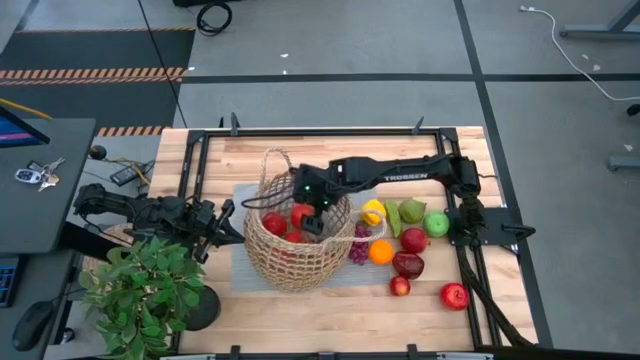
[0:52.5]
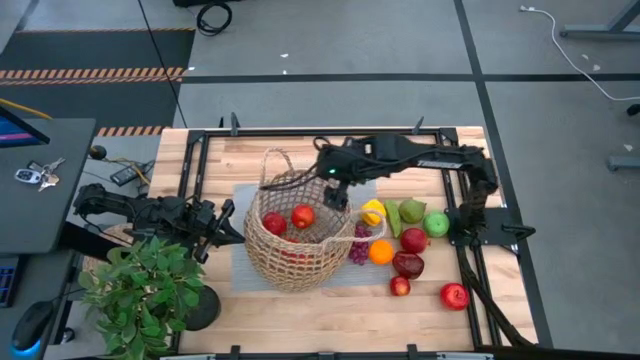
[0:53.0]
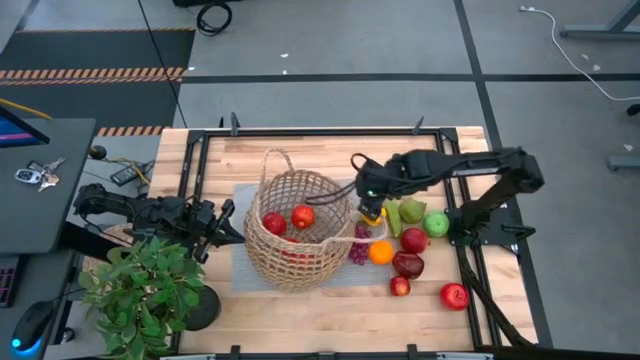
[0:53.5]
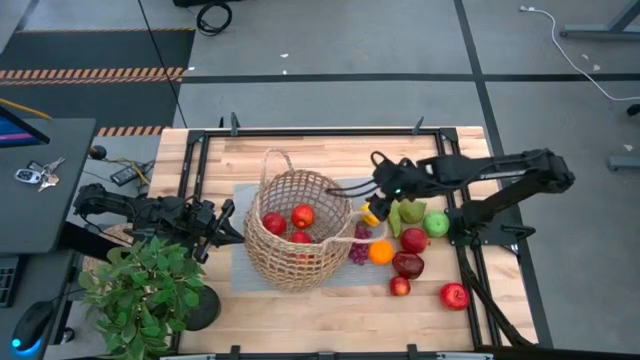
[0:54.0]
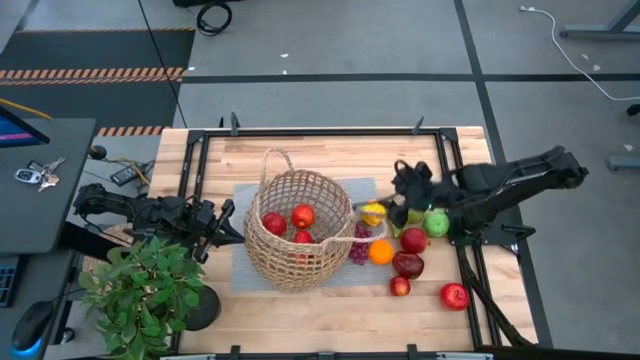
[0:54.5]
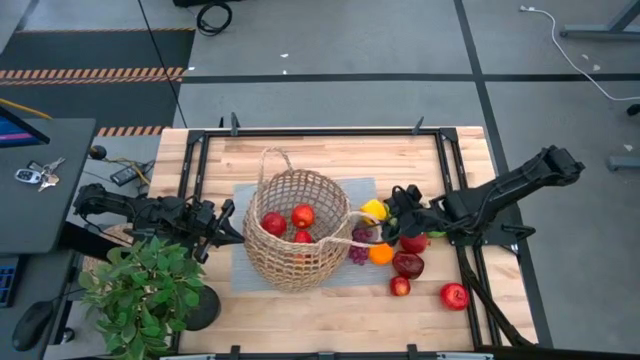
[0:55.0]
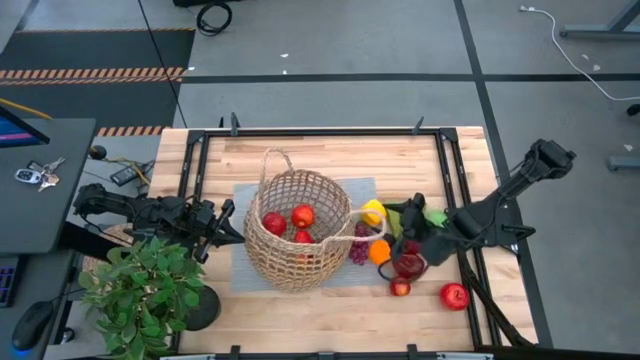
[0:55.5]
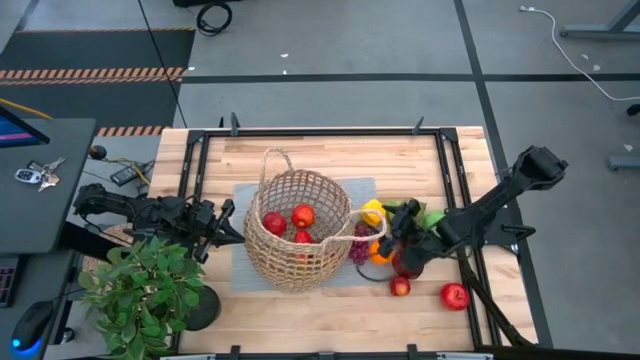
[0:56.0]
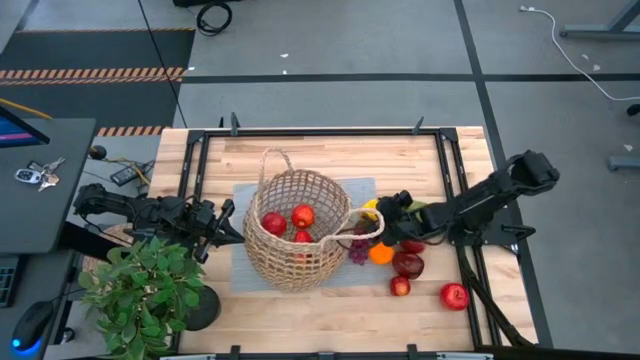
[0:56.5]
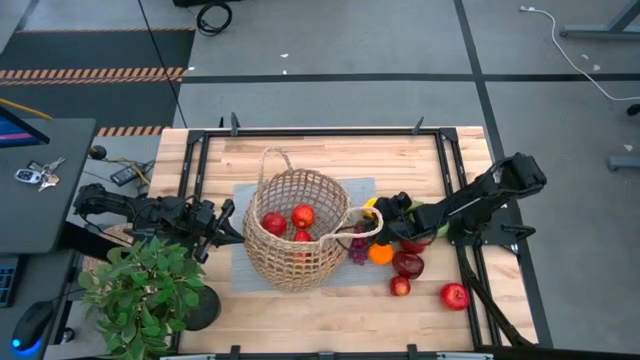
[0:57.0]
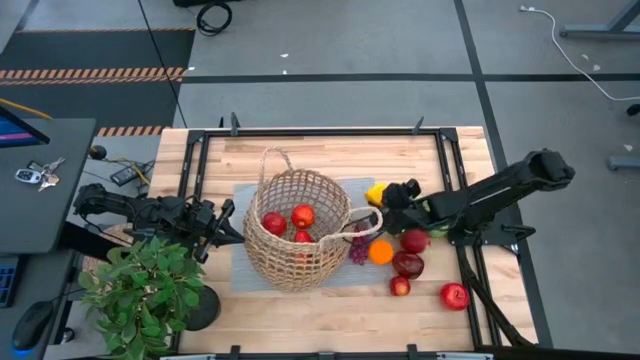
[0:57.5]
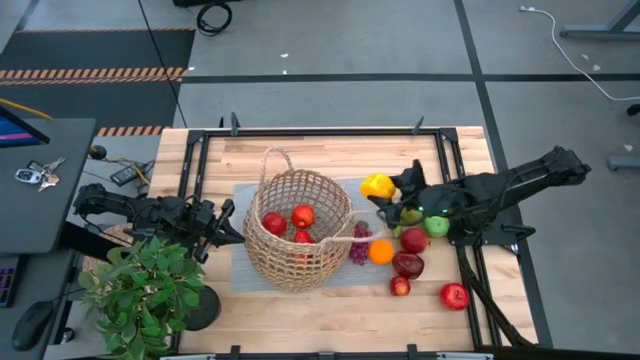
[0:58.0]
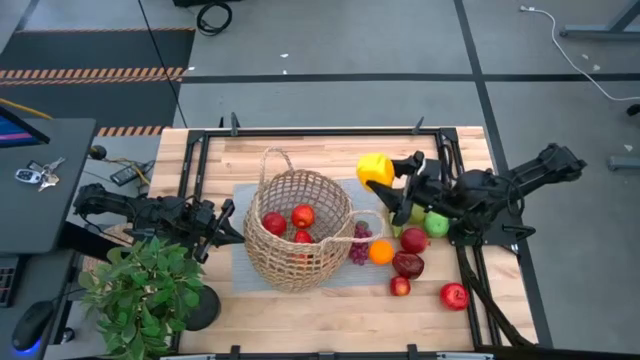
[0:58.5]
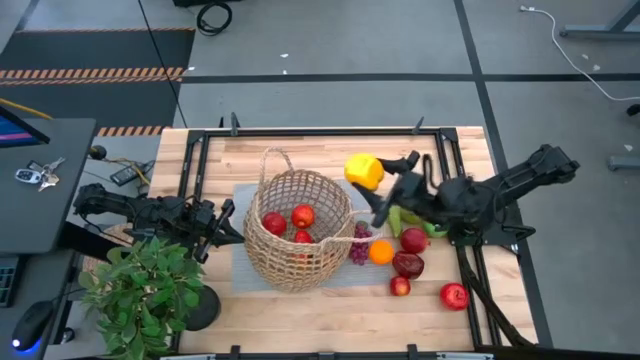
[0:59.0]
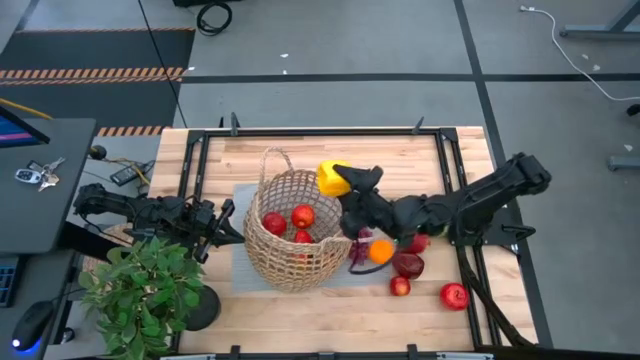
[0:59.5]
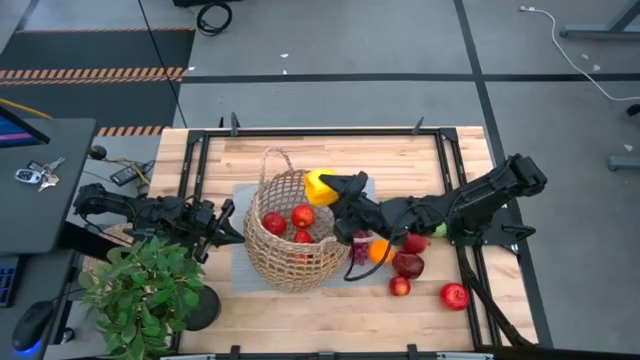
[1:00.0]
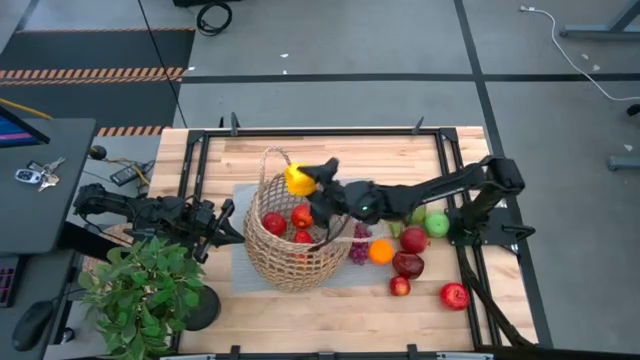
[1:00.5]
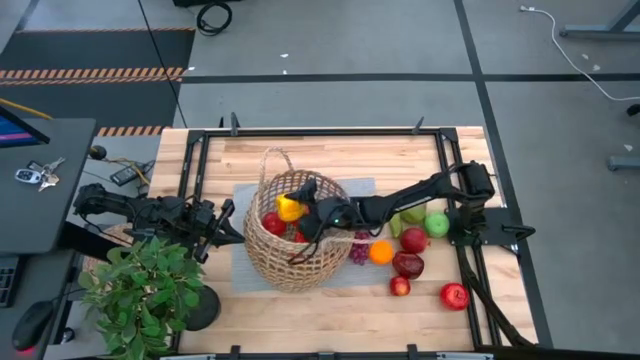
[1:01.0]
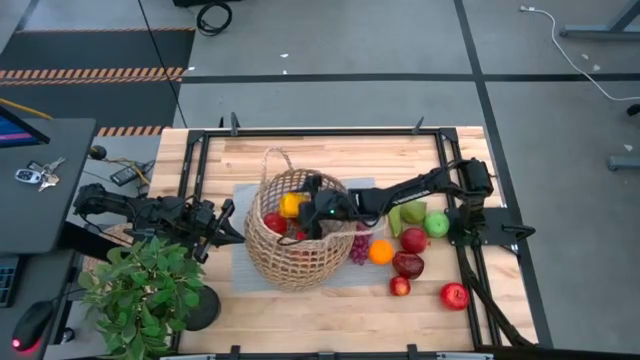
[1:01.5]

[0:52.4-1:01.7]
Task: Build produce basket
Put the yellow bell pepper into the basket

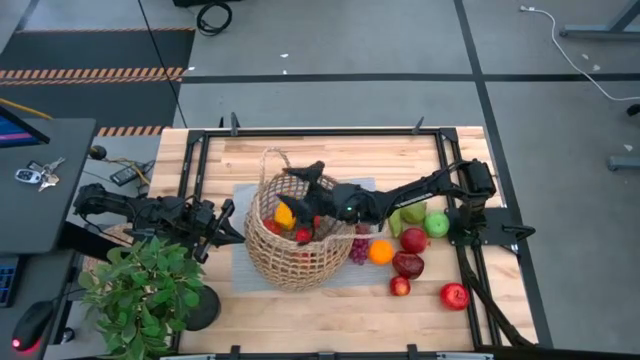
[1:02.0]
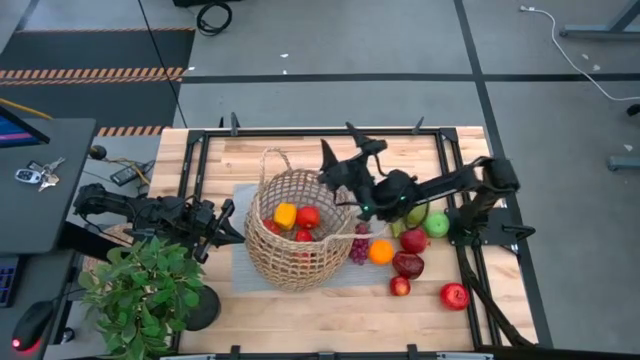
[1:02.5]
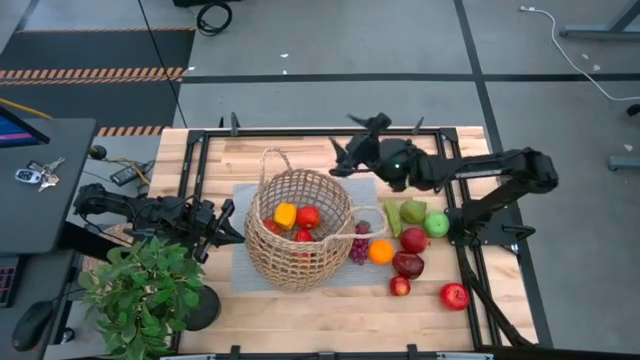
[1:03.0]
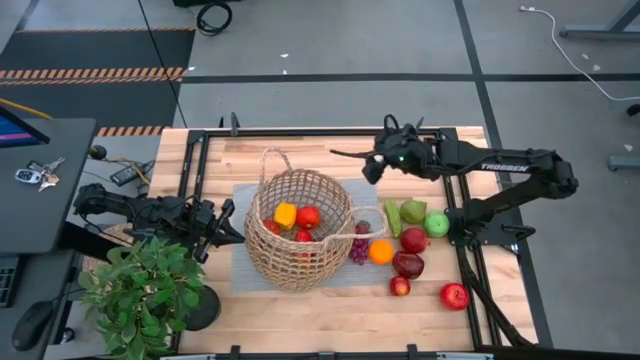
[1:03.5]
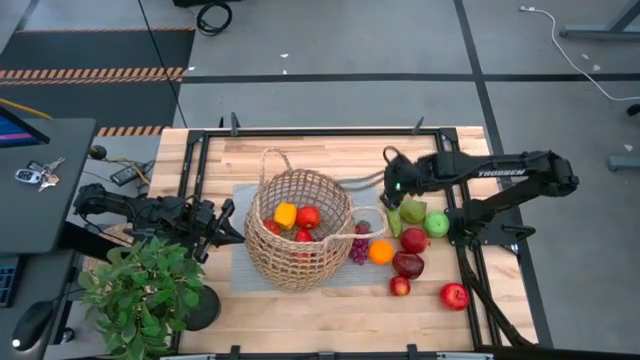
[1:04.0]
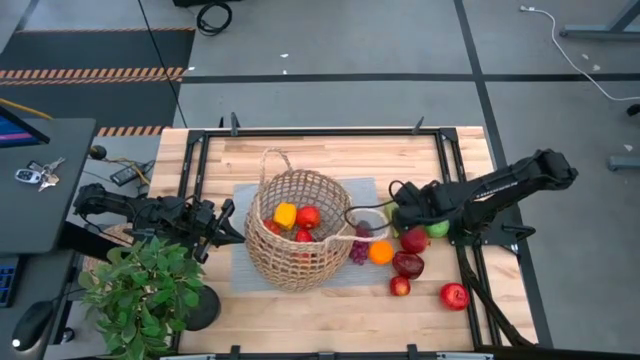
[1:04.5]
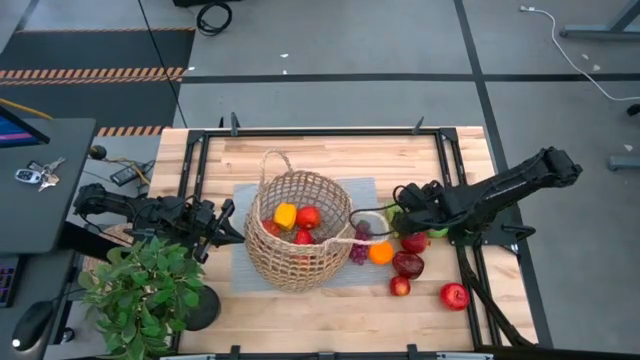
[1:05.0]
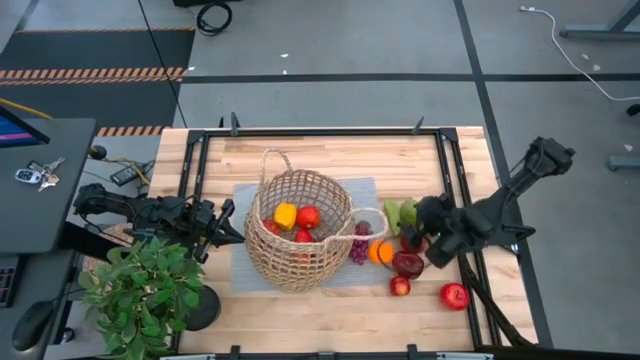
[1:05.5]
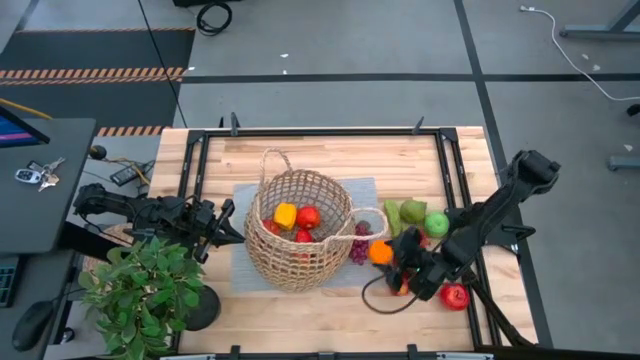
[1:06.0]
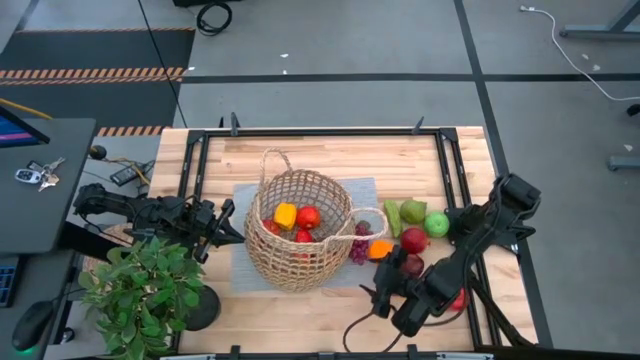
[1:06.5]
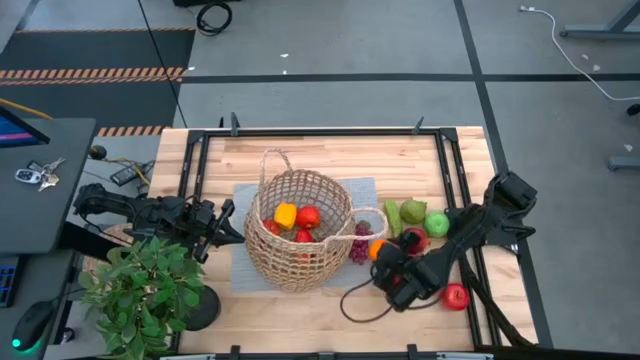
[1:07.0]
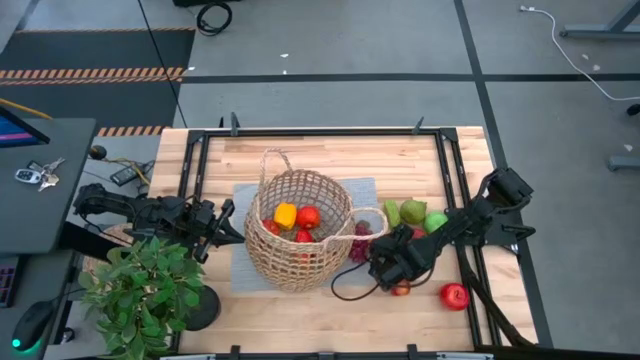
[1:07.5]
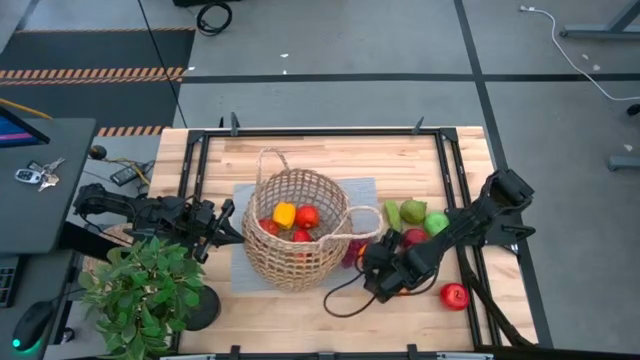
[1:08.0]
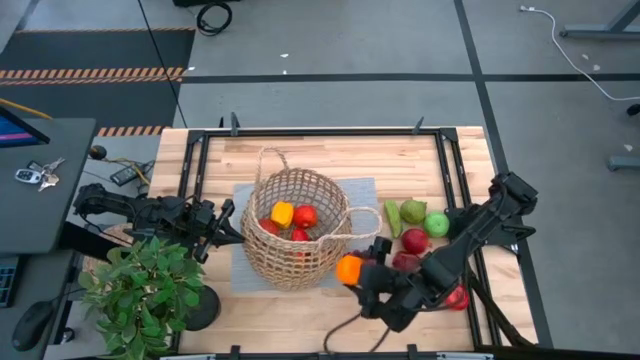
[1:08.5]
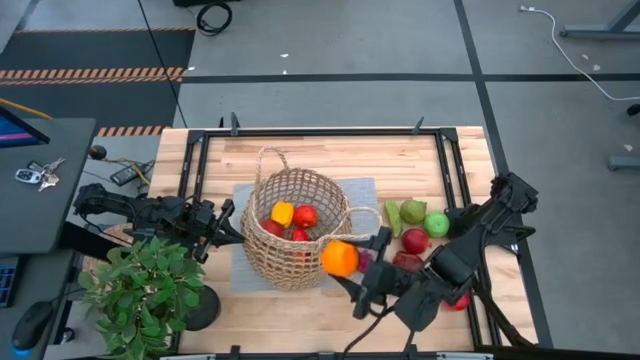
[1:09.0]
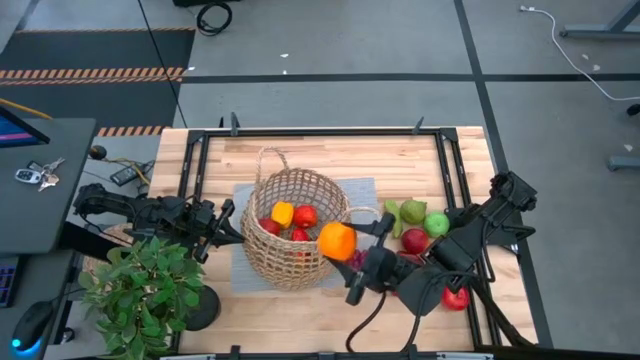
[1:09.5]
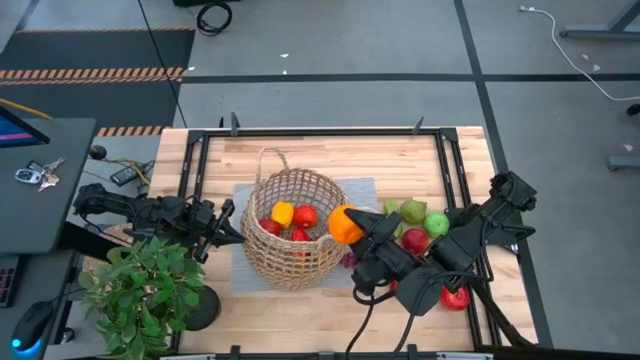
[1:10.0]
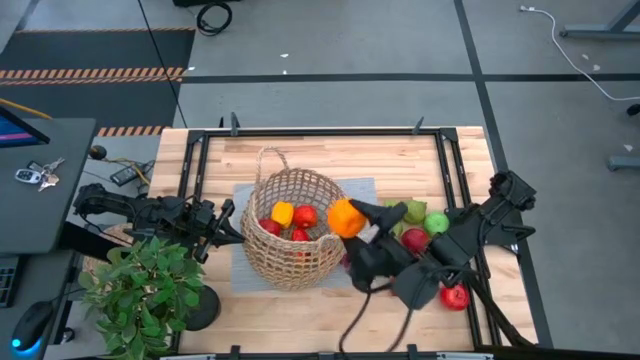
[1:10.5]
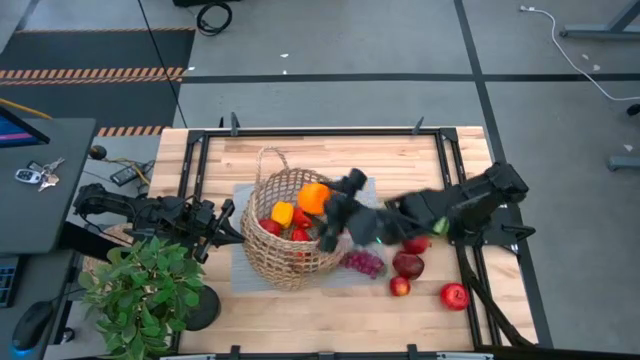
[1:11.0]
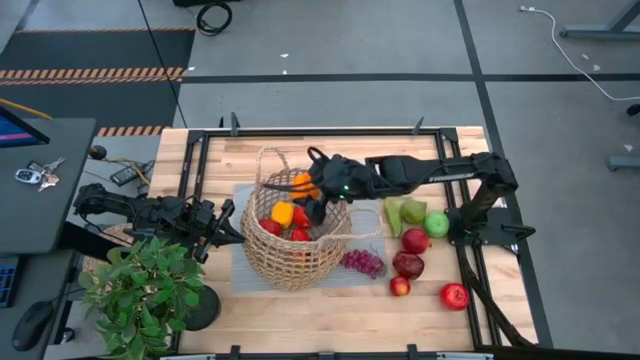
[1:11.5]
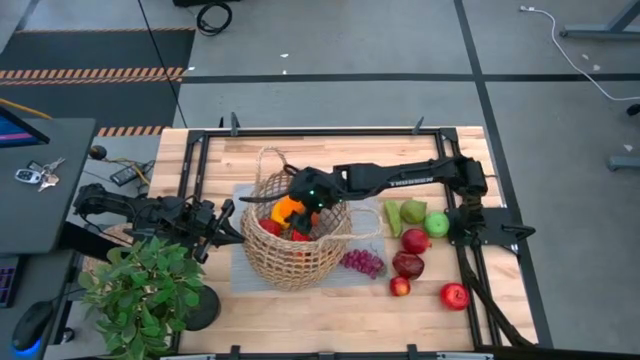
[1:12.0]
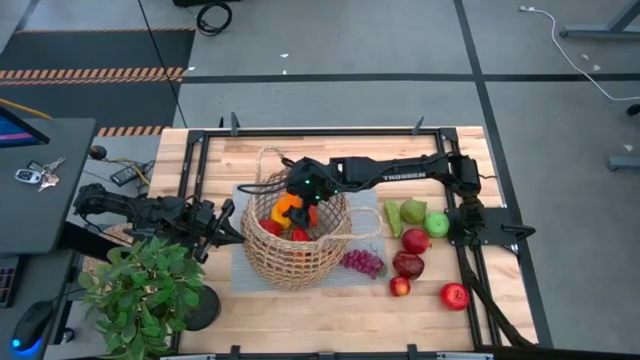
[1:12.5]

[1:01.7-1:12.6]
Put the orange into the basket
